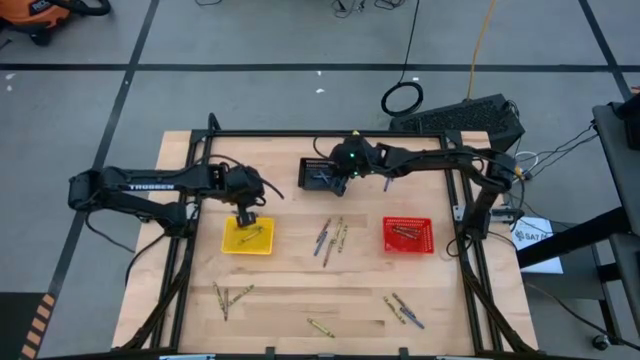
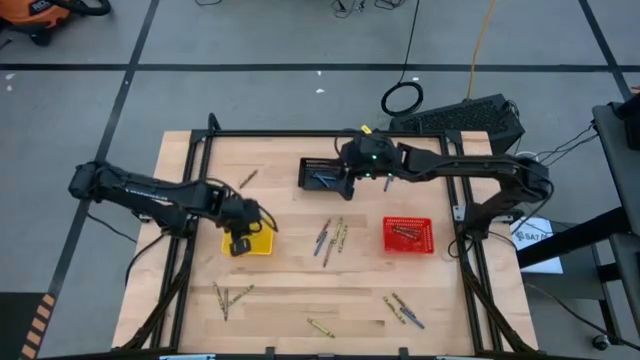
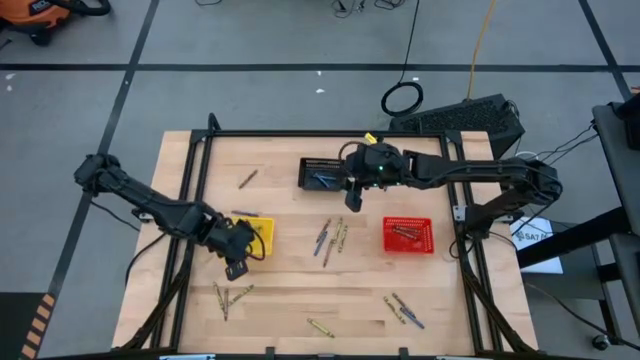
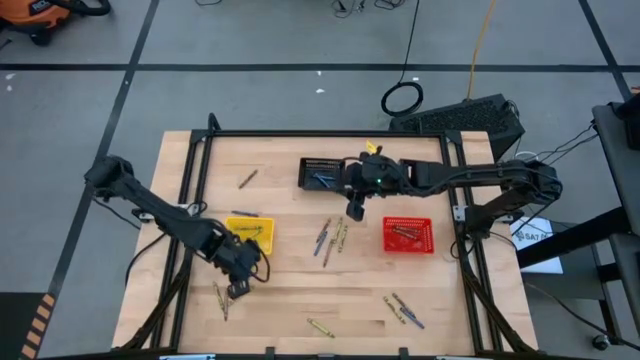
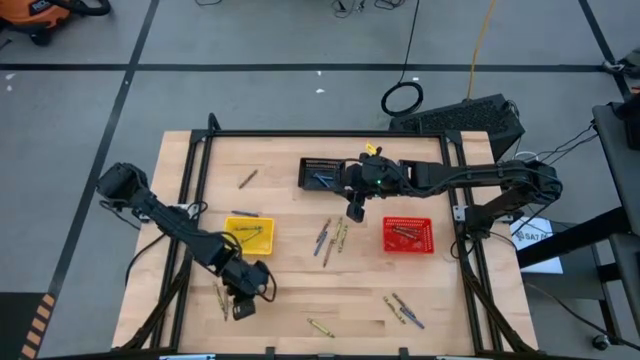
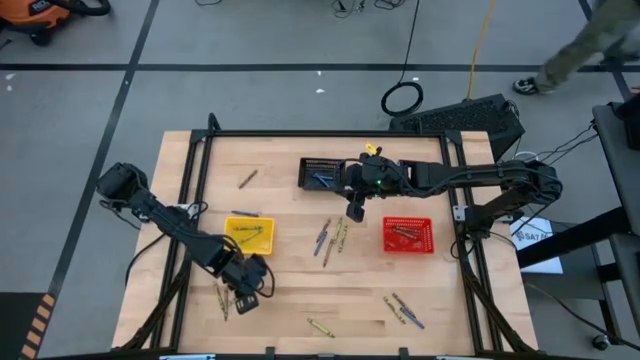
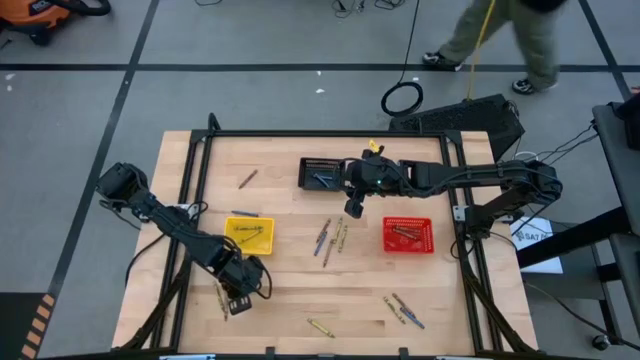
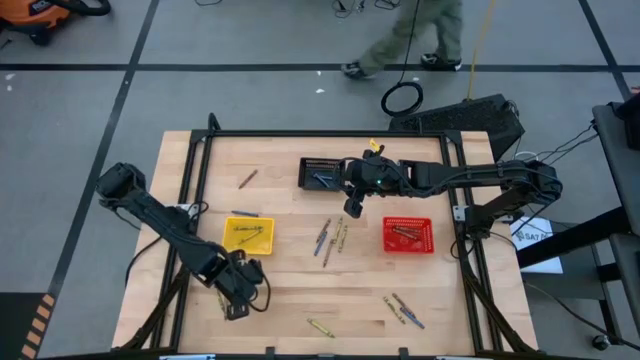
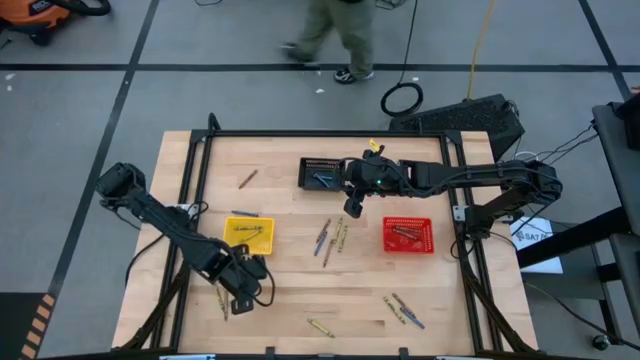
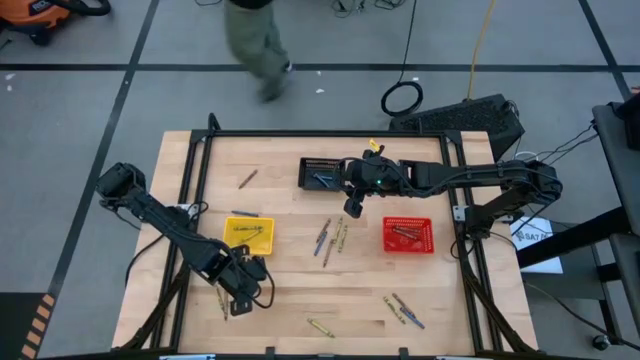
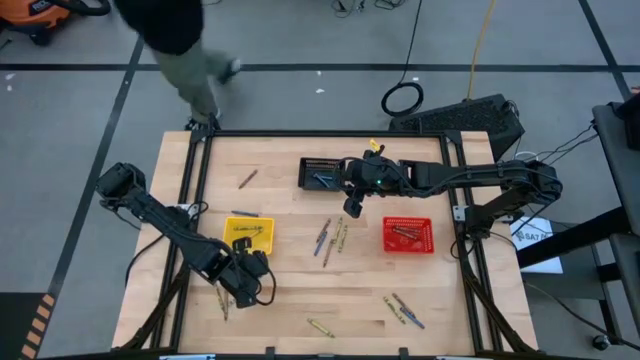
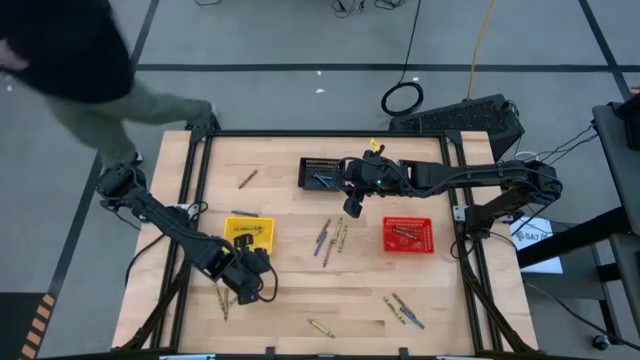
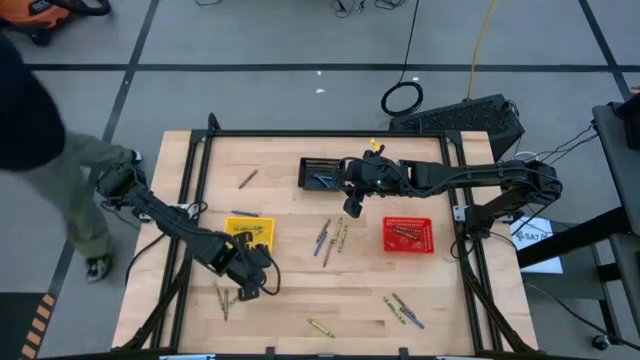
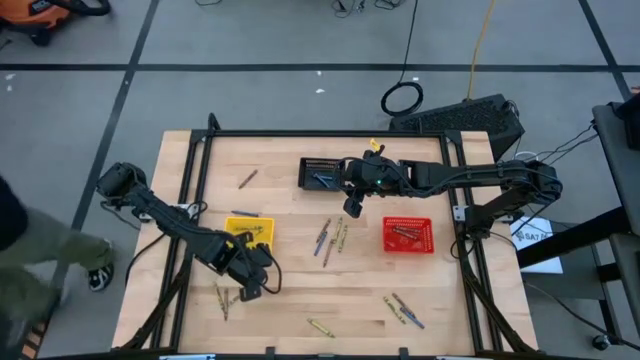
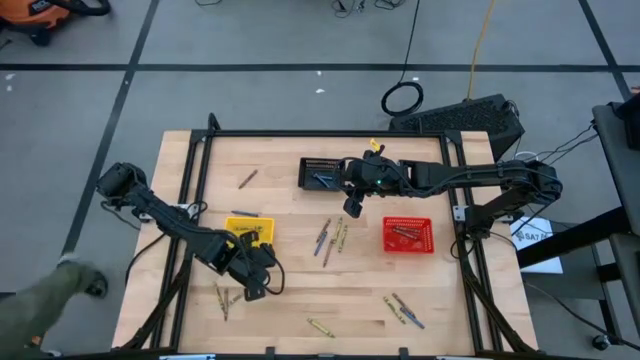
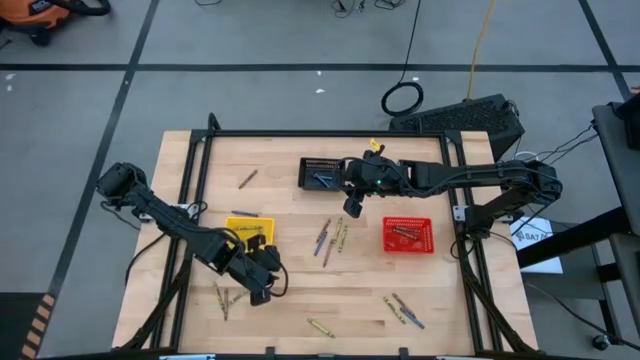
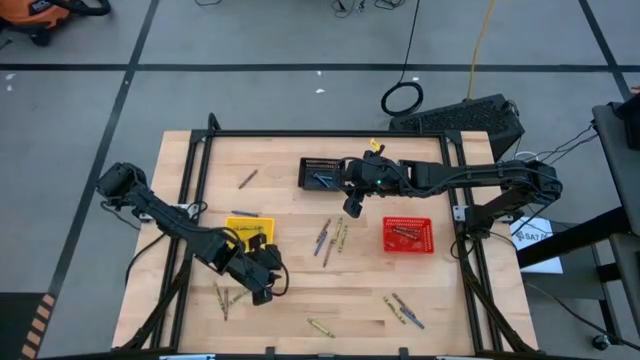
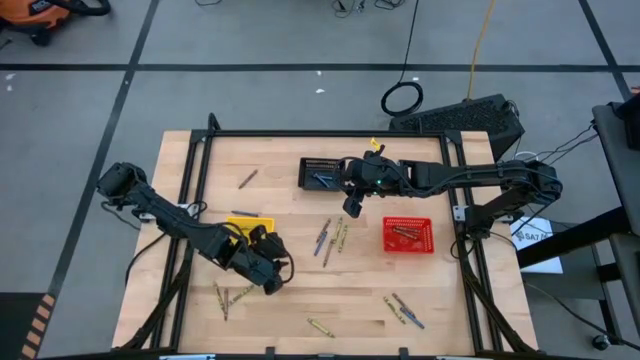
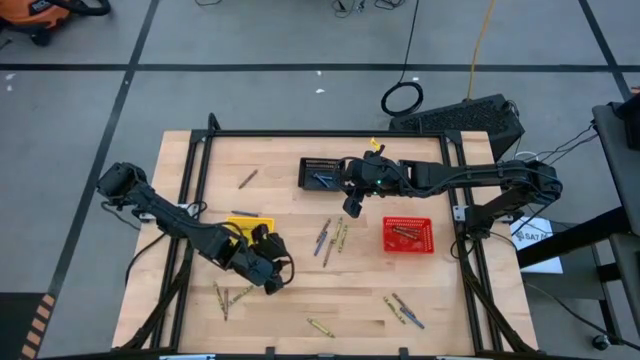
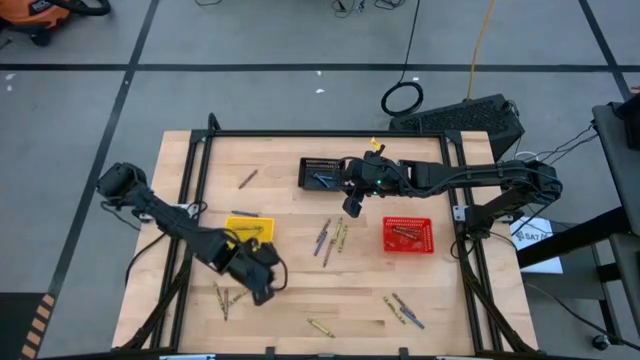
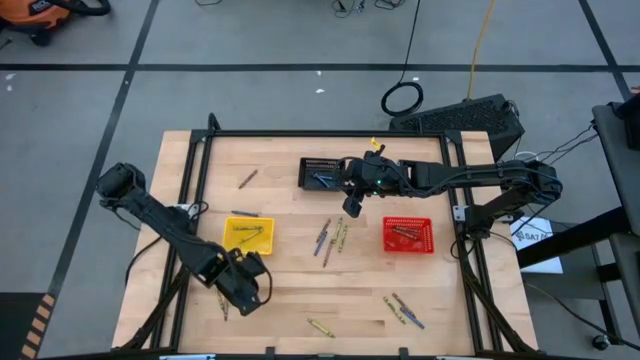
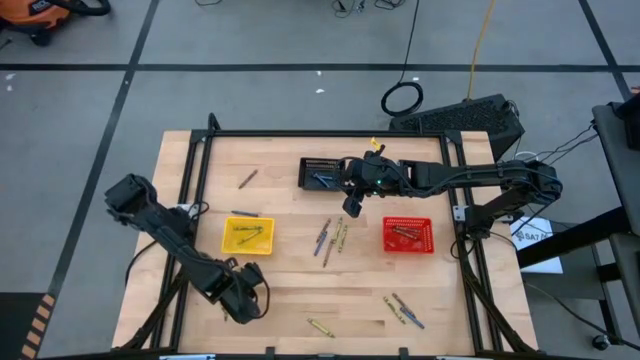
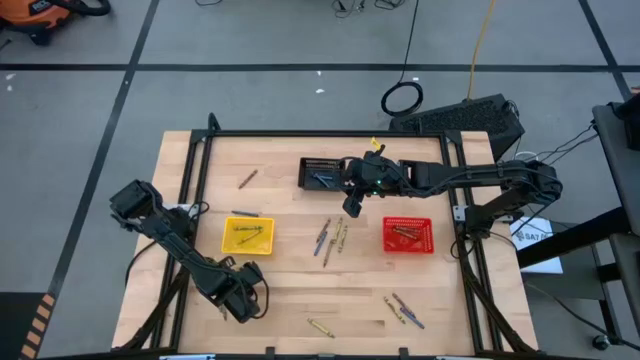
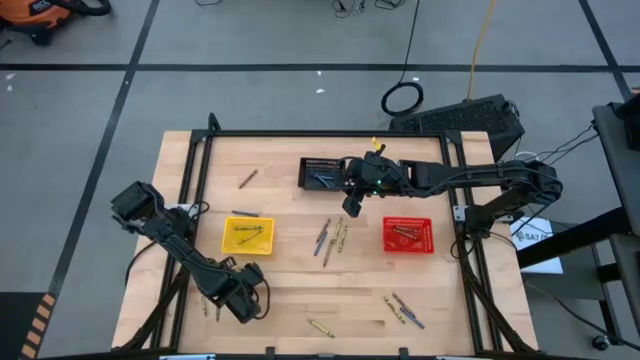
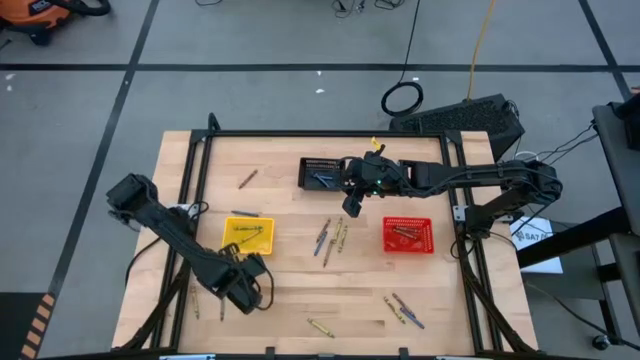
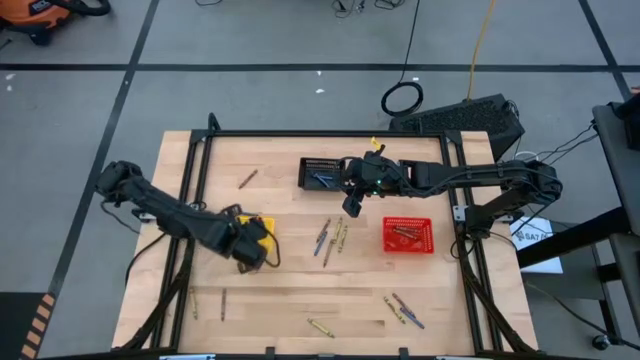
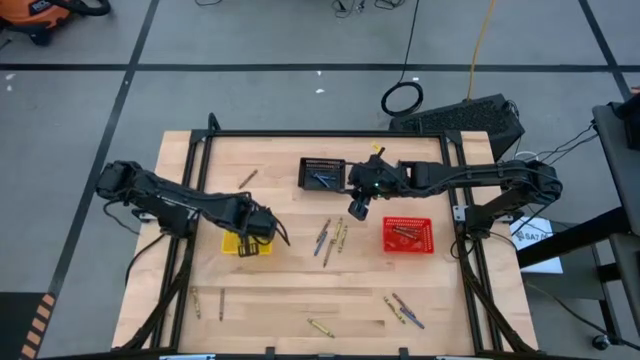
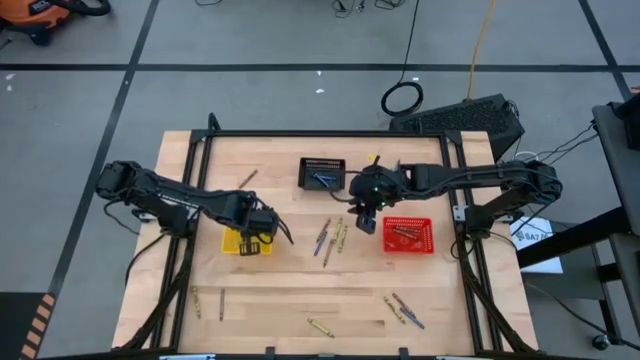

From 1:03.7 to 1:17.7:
Task: Sort crayons
Put the green crayon into the yellow bin

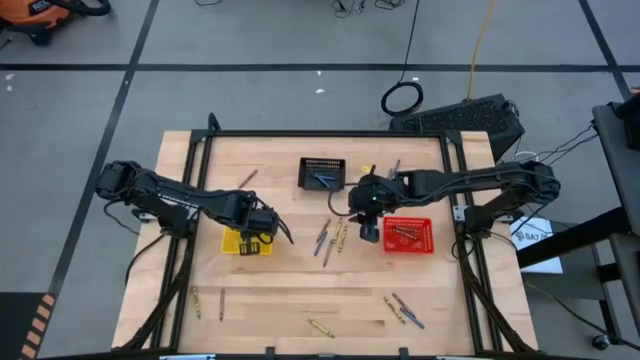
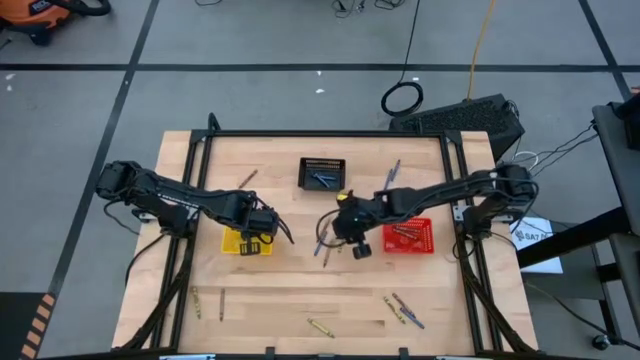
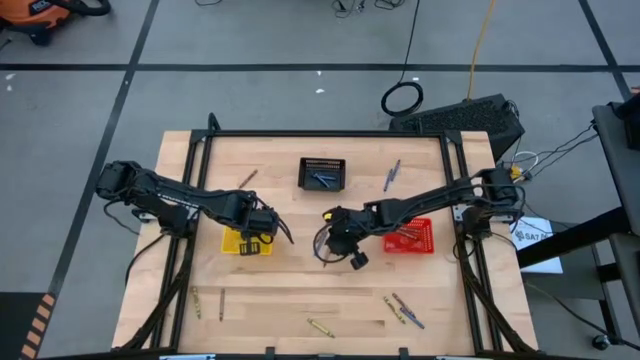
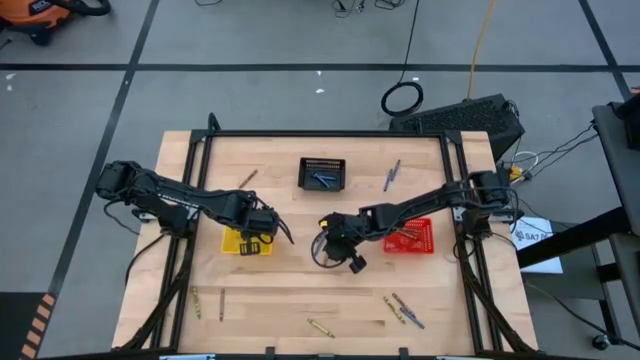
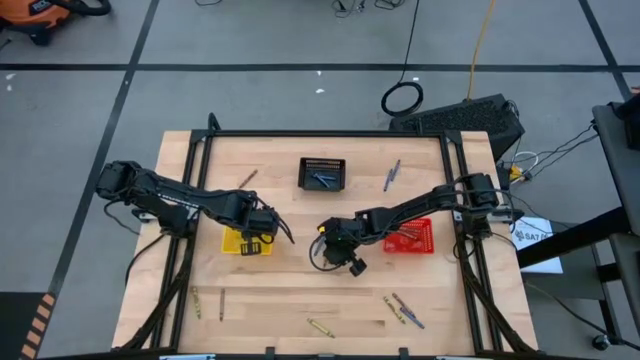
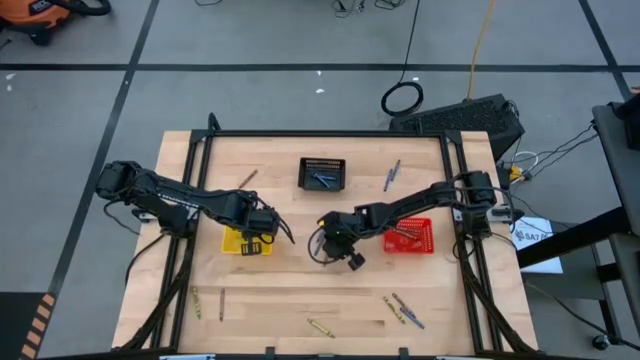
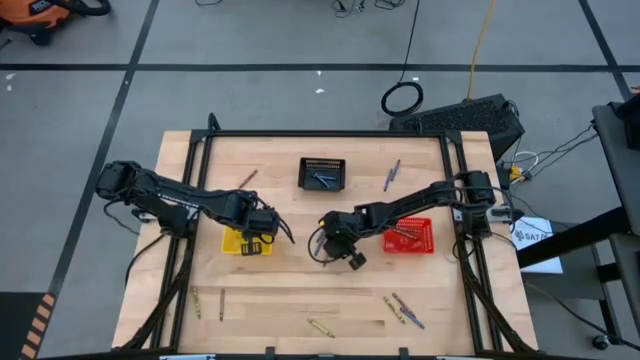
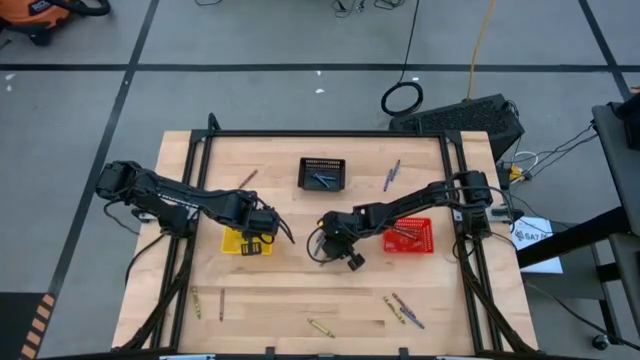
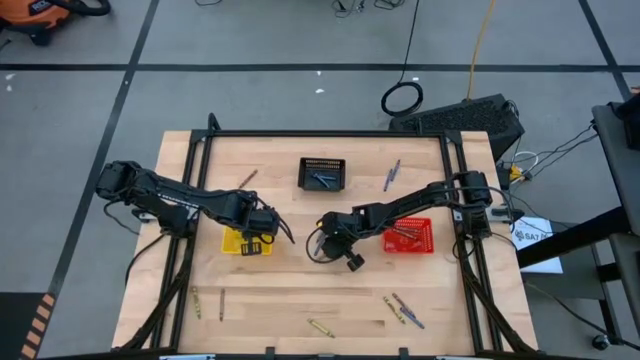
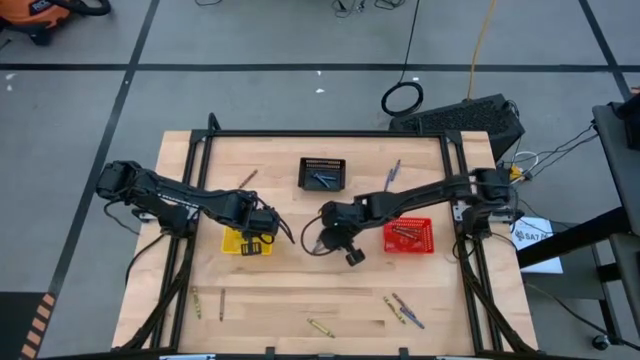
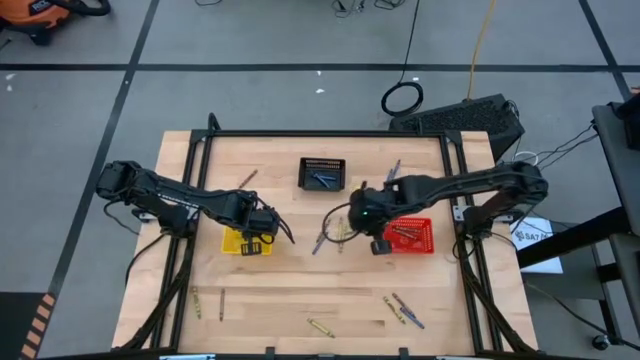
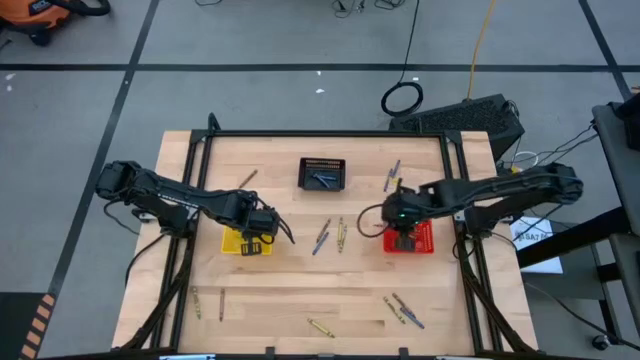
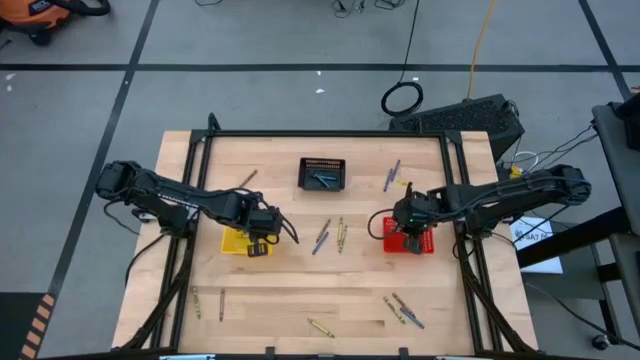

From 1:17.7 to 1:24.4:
Put the brown crayon into the red bin
